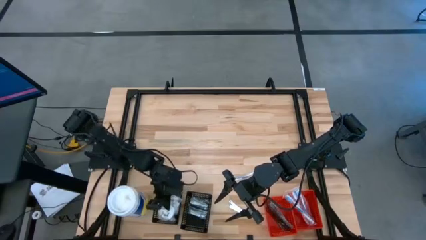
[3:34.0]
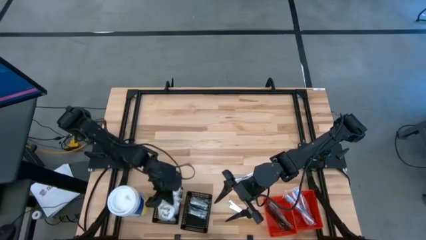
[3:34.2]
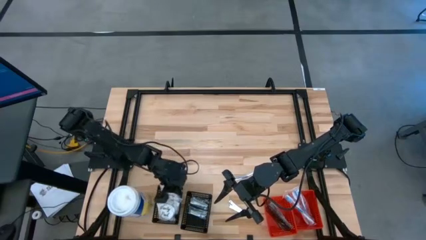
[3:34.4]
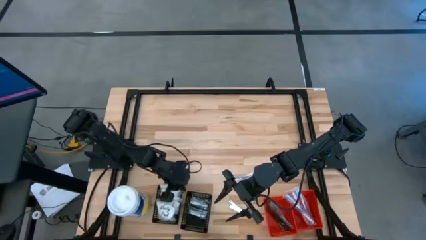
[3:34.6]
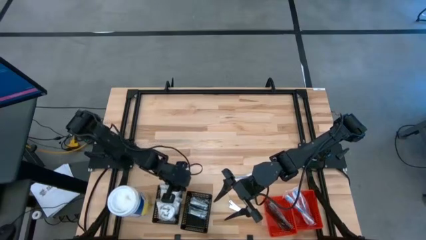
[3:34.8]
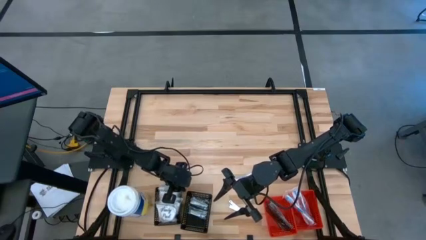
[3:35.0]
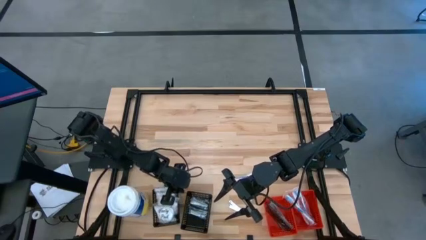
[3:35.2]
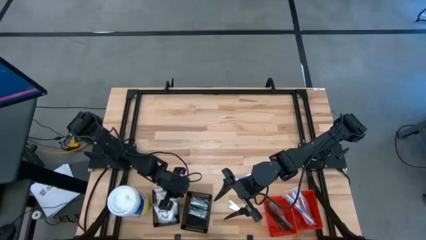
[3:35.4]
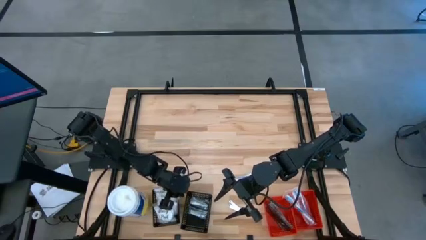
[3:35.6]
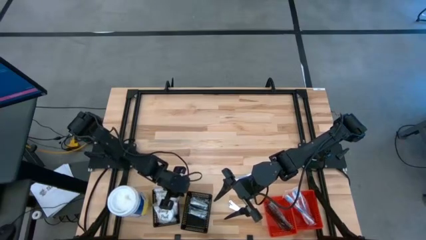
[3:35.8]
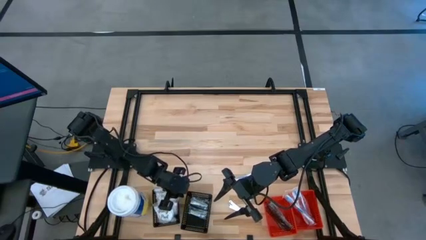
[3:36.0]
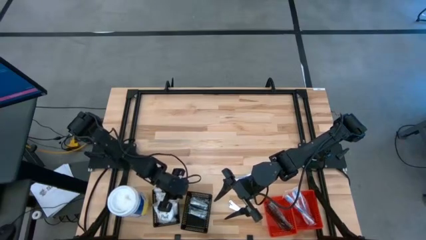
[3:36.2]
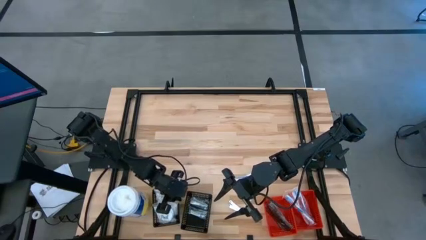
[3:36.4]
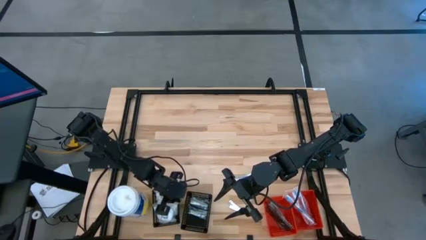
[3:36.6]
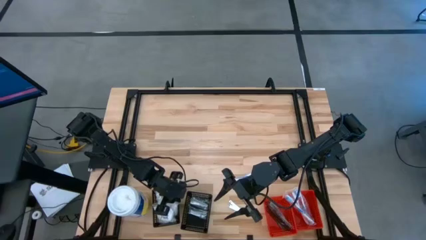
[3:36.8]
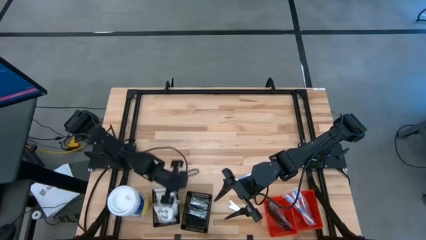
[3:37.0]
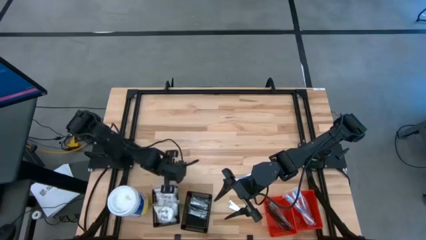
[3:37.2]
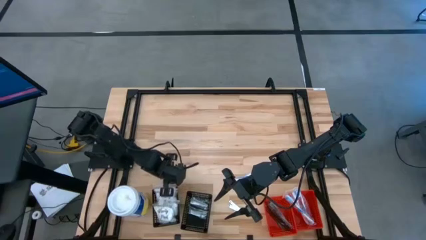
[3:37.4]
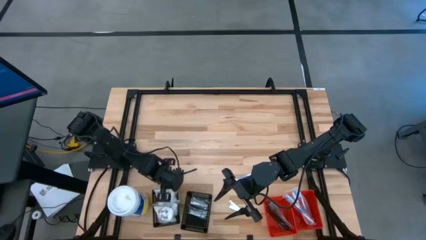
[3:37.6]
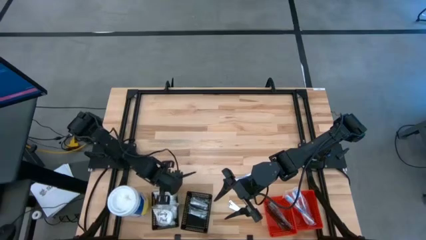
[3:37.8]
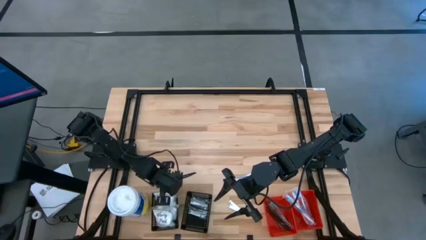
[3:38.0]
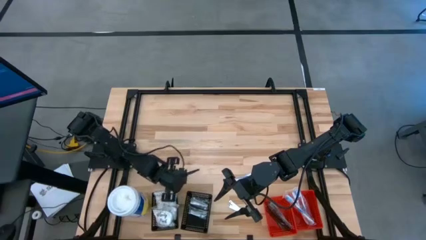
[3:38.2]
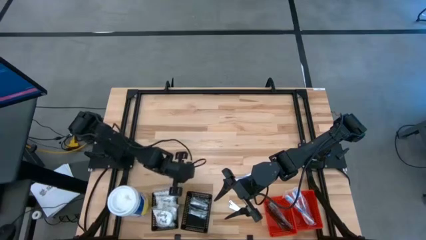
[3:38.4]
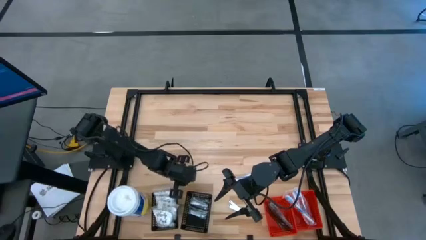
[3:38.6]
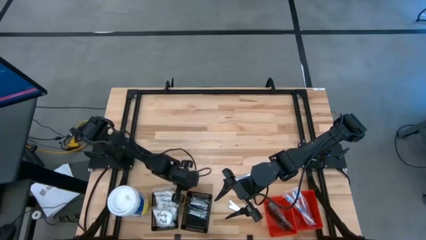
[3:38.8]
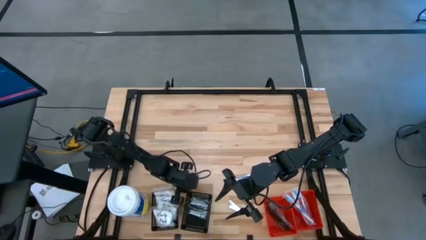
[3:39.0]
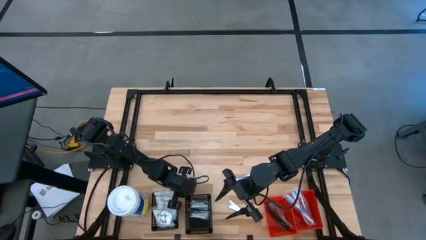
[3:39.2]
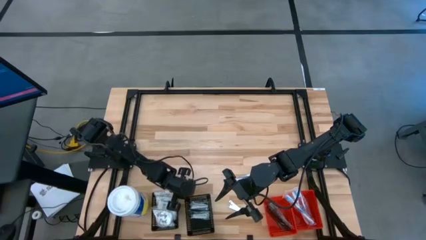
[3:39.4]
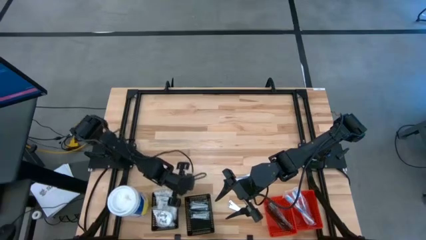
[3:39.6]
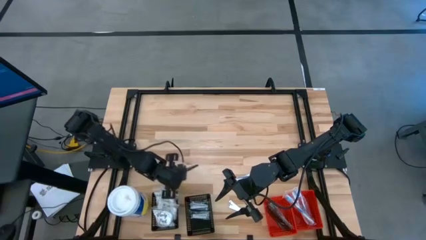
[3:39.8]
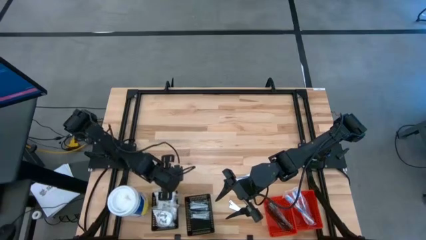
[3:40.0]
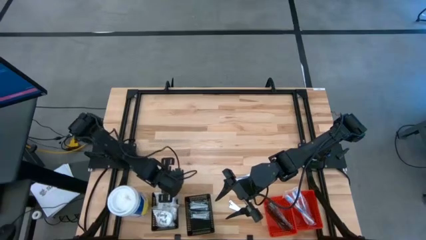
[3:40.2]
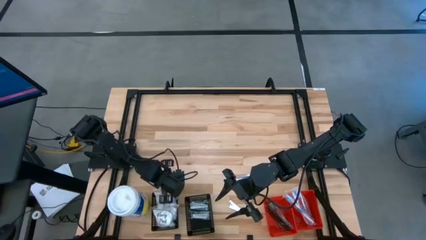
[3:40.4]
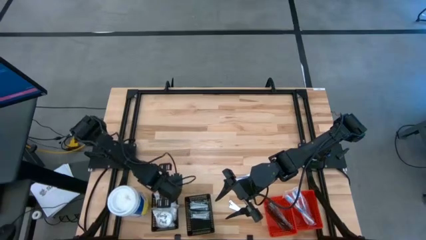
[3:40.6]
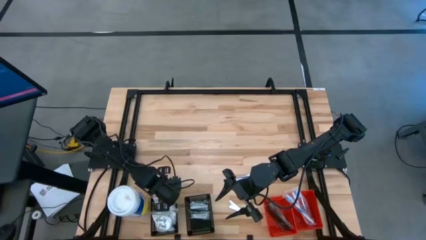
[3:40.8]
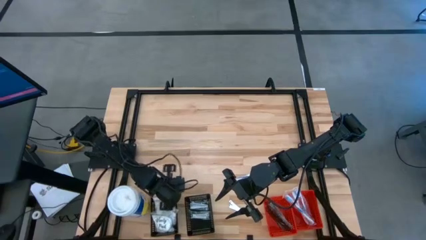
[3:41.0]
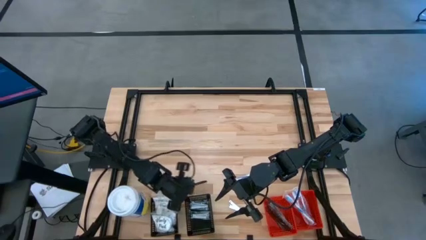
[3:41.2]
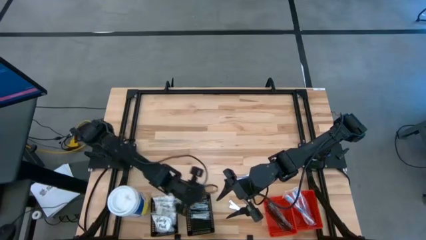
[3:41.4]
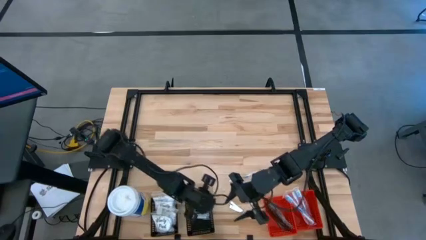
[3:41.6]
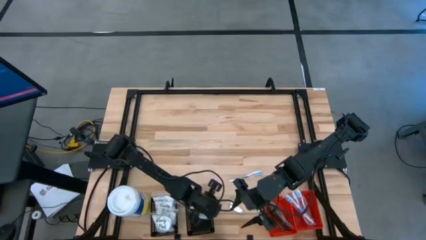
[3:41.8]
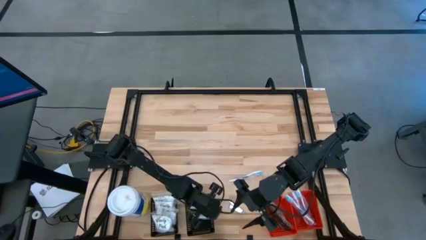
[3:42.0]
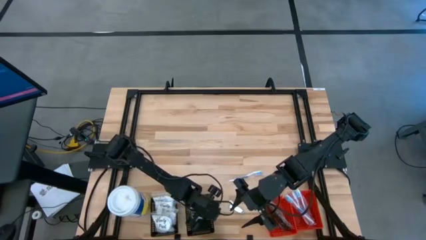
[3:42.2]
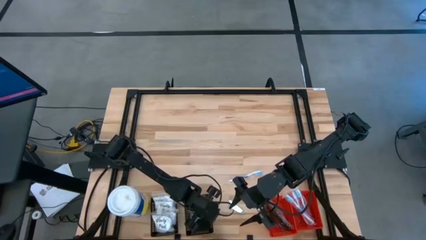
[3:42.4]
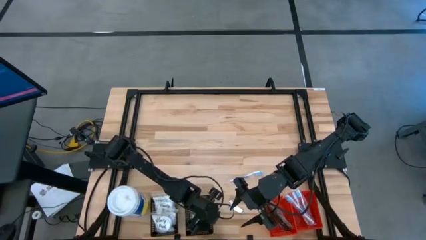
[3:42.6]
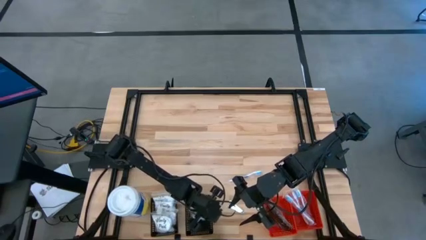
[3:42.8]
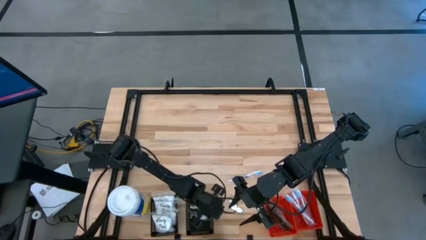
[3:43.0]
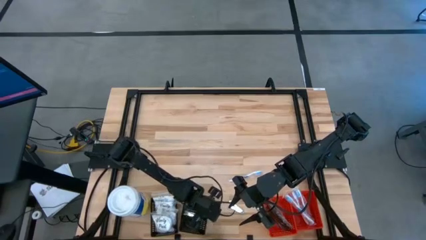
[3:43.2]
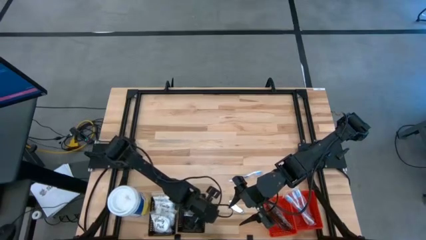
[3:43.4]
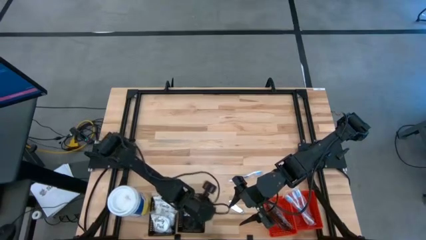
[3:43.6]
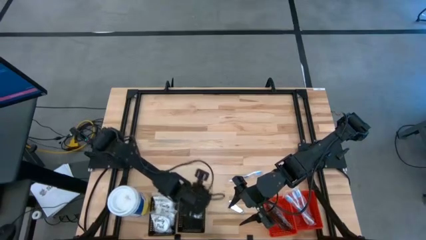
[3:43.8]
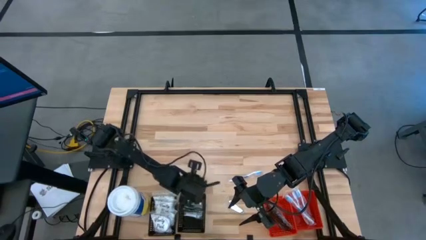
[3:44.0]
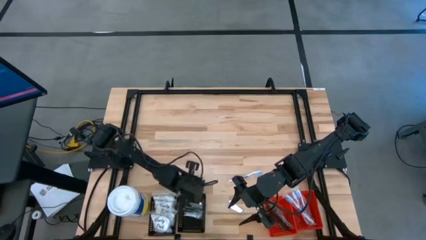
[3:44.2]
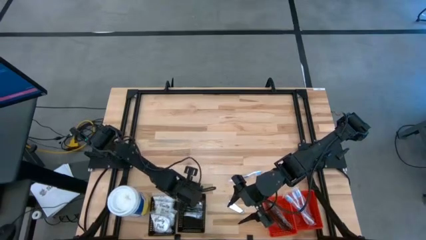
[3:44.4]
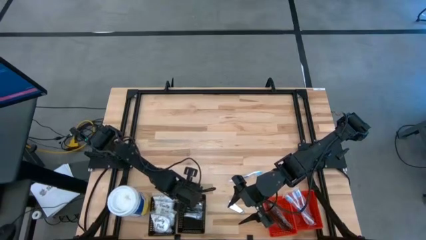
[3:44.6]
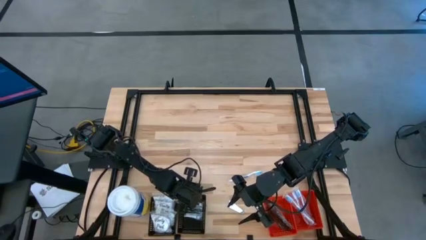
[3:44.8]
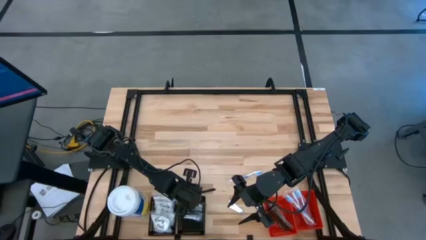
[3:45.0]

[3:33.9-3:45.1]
Task: Pick & Place Travel size toiletries
Adjust the black bins

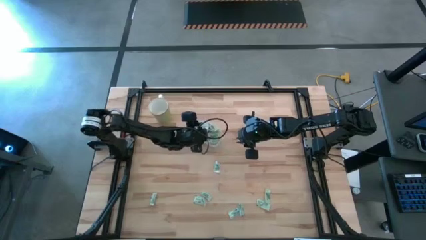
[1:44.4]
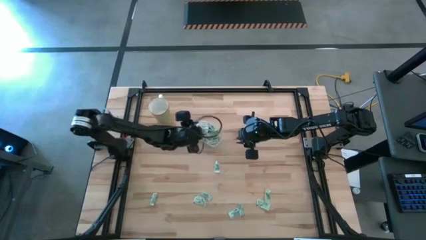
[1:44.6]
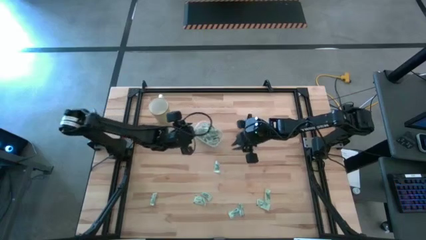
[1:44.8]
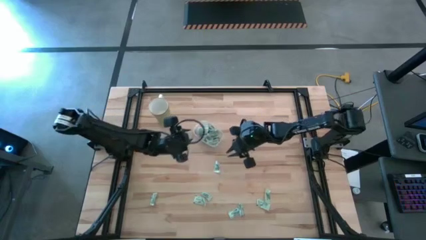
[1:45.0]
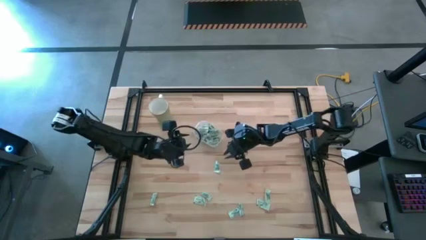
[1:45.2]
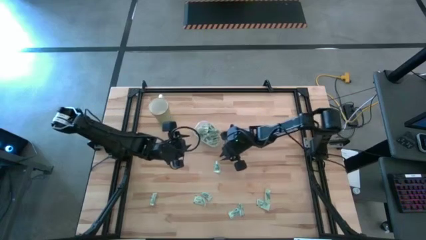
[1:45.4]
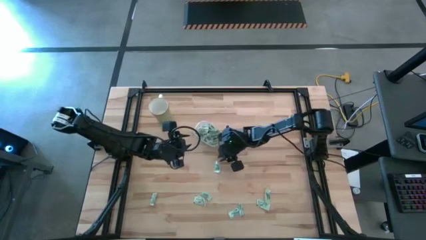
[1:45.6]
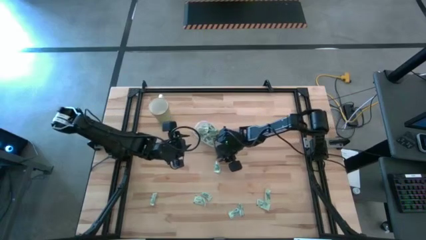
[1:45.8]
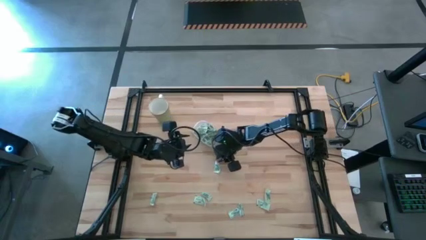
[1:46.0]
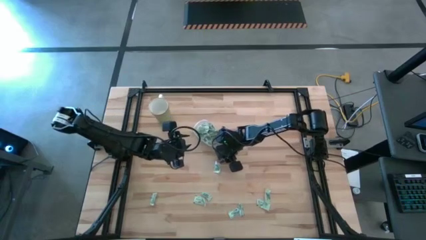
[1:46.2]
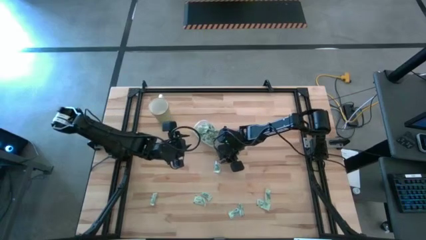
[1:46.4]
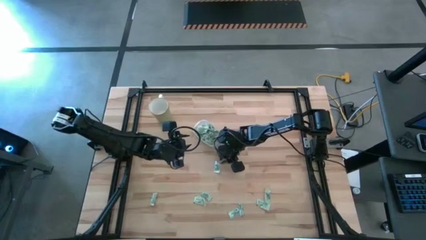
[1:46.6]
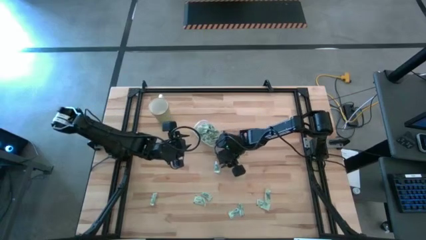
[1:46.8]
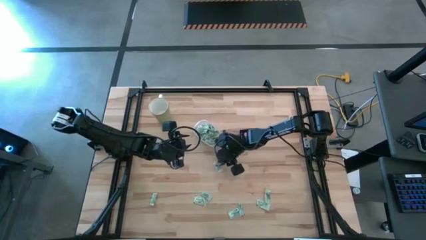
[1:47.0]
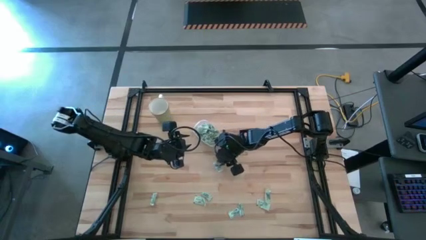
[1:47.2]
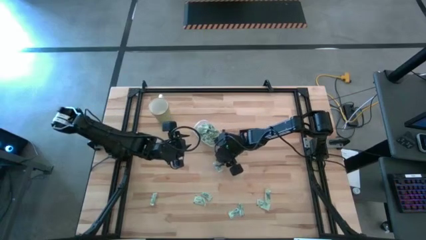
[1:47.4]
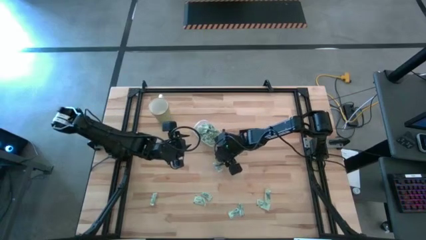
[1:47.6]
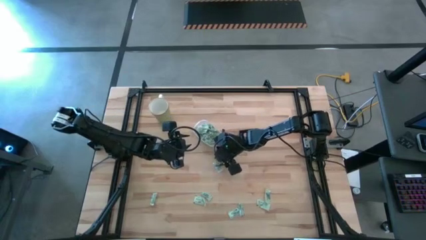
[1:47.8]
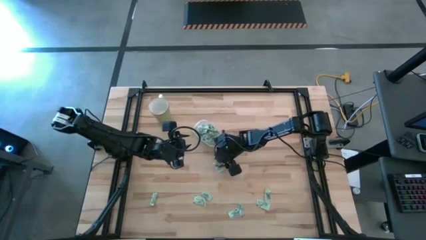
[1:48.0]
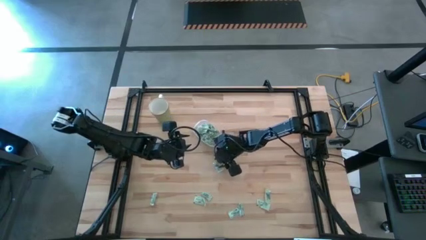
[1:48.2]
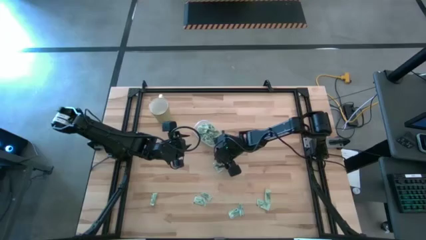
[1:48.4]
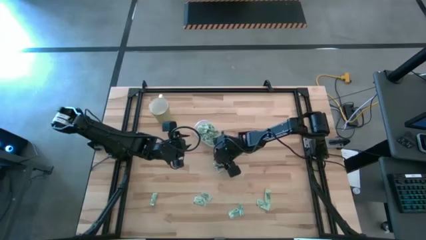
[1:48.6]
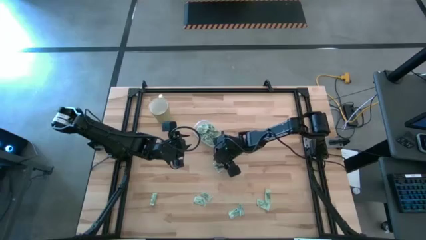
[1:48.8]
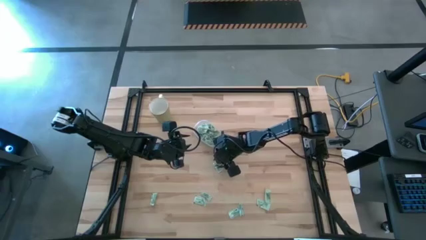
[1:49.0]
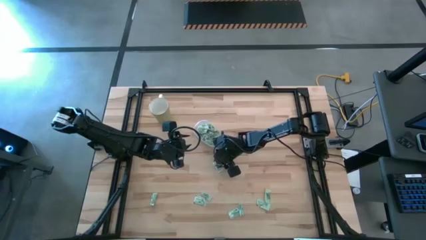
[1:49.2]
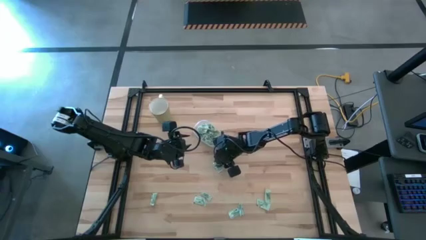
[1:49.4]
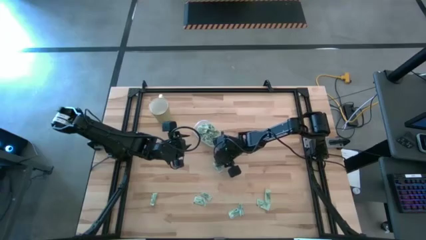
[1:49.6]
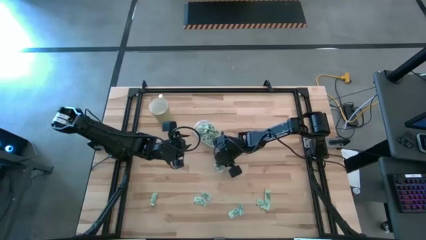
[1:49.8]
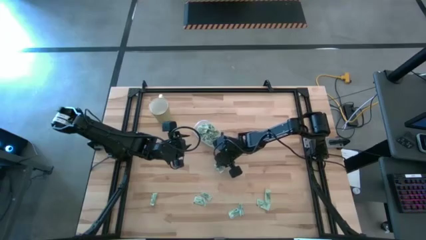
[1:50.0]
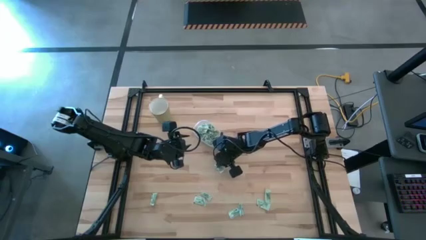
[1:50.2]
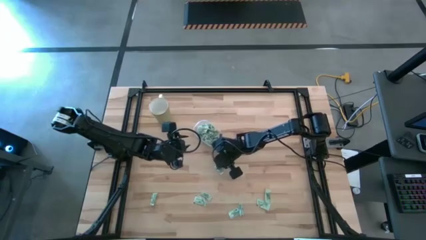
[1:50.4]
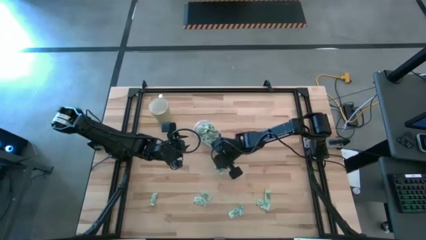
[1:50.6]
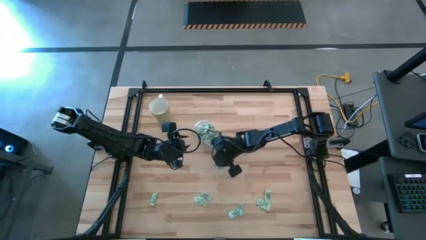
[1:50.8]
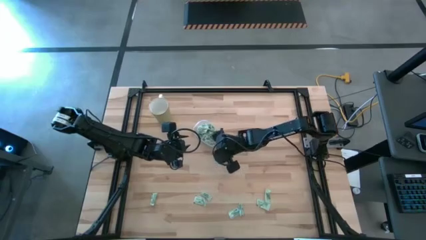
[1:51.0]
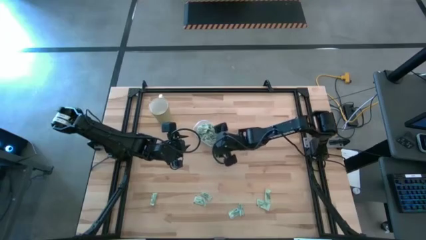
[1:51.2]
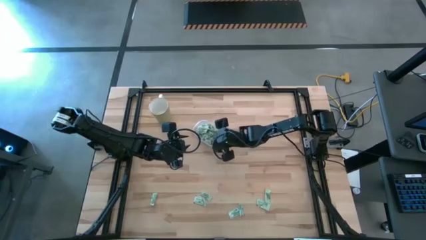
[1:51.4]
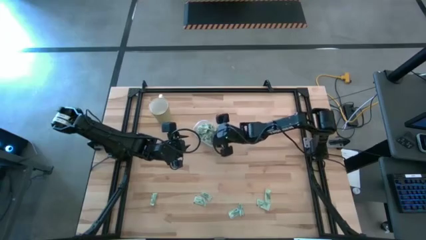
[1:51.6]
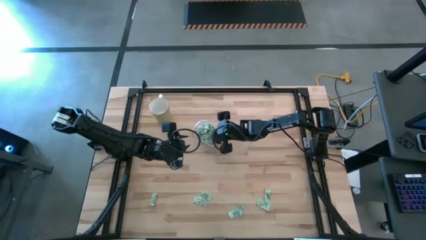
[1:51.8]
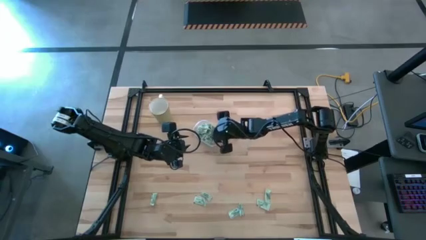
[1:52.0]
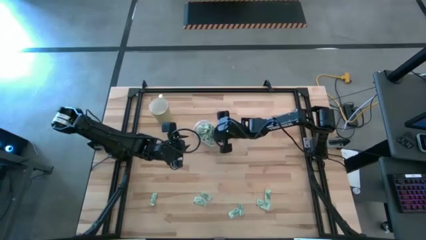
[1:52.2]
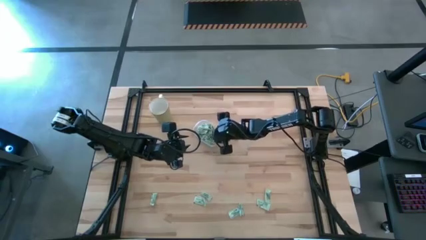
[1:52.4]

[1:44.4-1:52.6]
Task: Pick and place Stevia / Truvia into bins
Put the stevia packet into the transparent container
